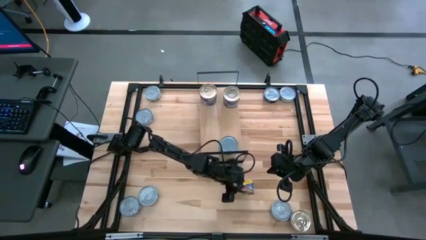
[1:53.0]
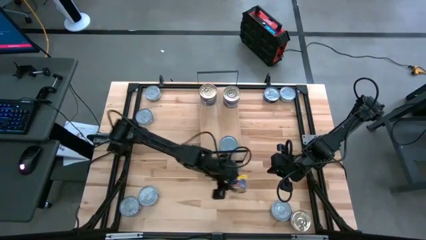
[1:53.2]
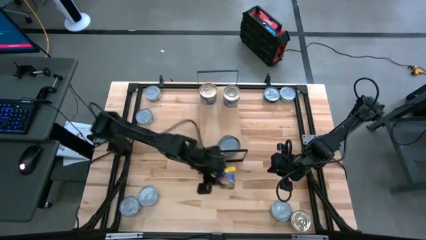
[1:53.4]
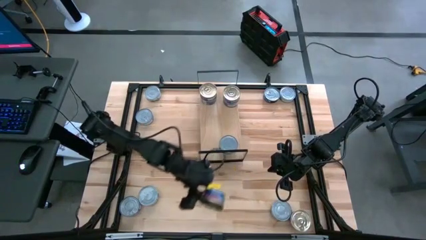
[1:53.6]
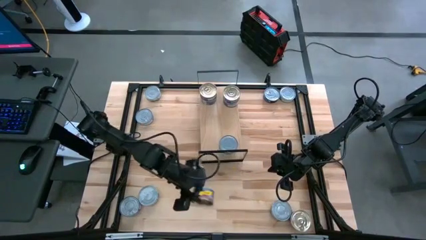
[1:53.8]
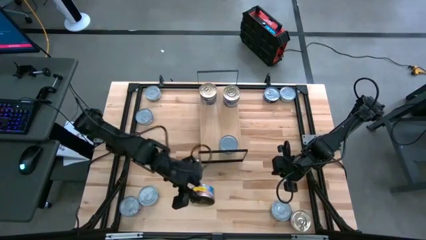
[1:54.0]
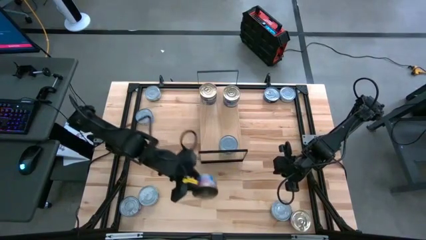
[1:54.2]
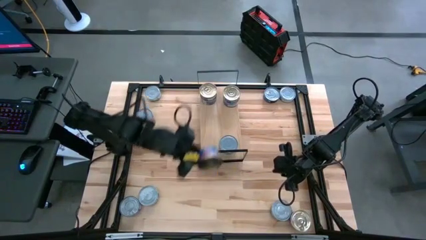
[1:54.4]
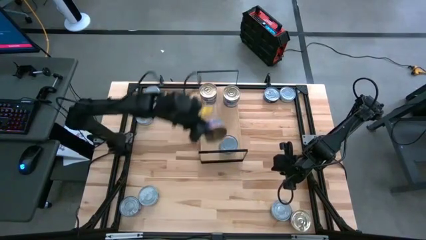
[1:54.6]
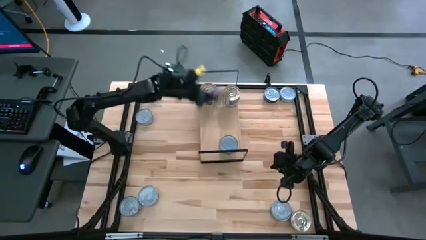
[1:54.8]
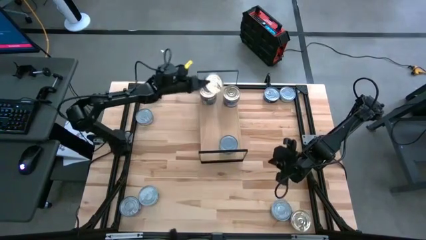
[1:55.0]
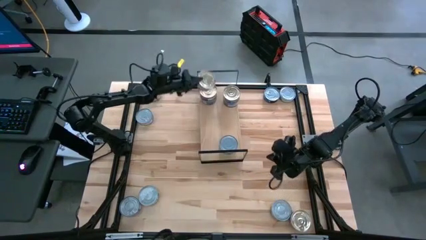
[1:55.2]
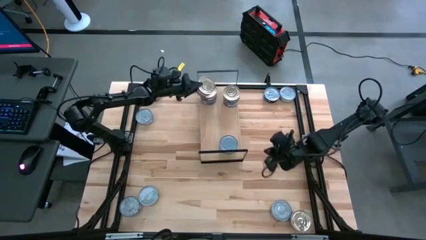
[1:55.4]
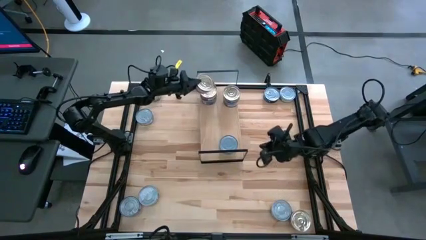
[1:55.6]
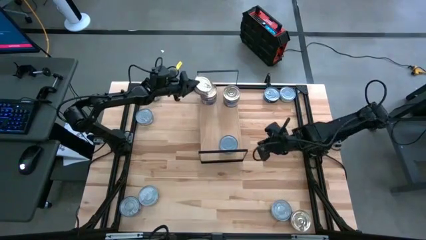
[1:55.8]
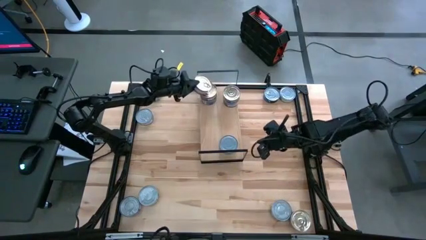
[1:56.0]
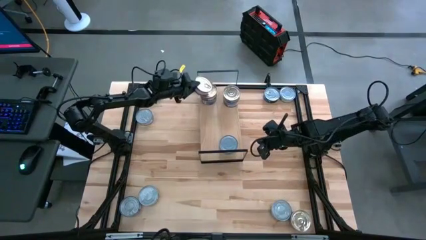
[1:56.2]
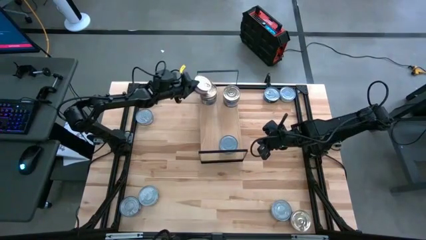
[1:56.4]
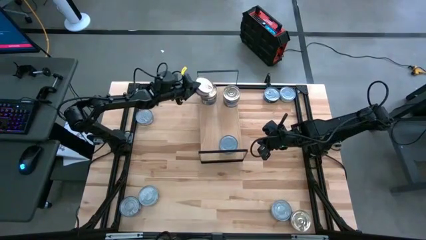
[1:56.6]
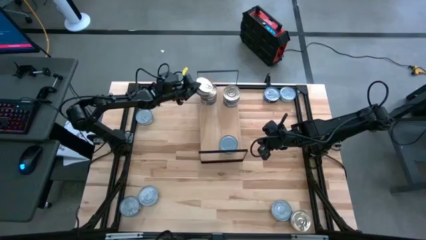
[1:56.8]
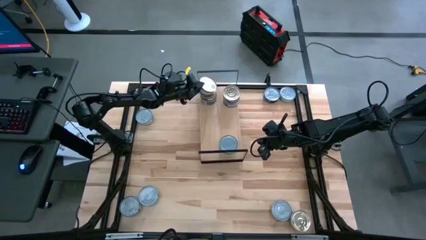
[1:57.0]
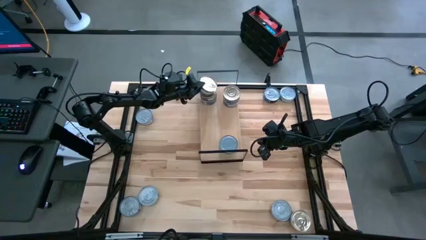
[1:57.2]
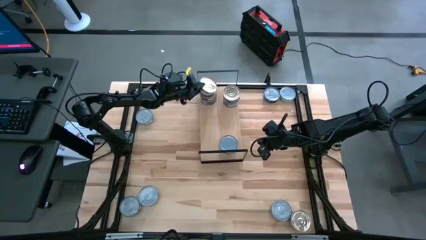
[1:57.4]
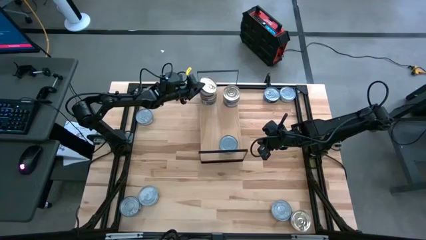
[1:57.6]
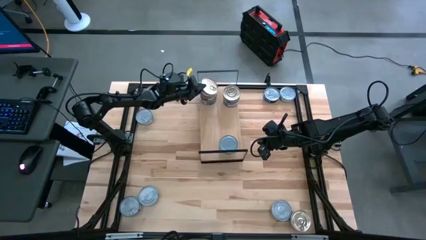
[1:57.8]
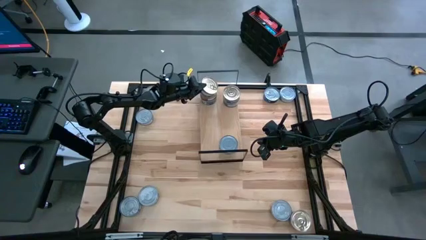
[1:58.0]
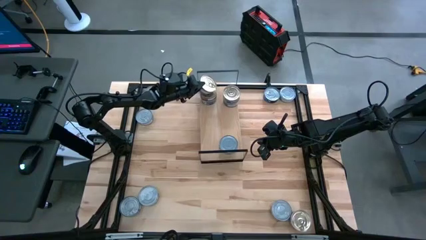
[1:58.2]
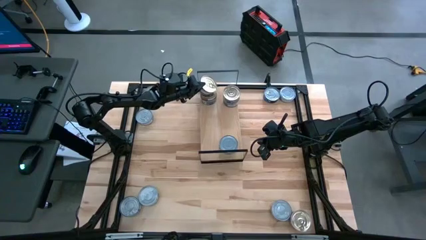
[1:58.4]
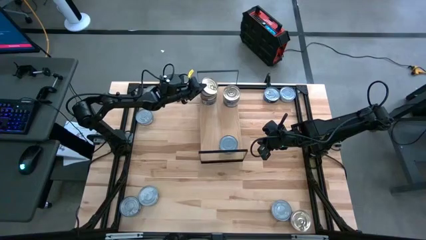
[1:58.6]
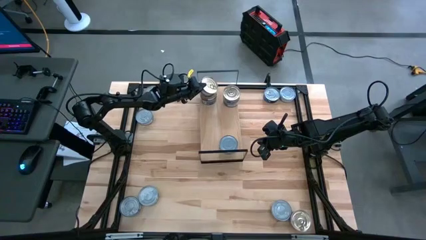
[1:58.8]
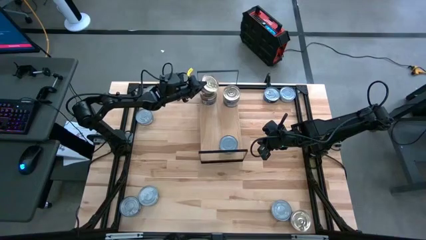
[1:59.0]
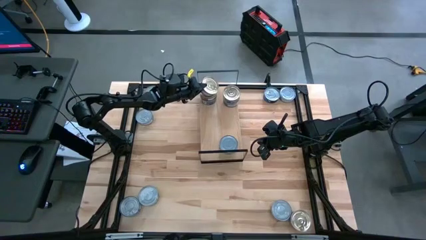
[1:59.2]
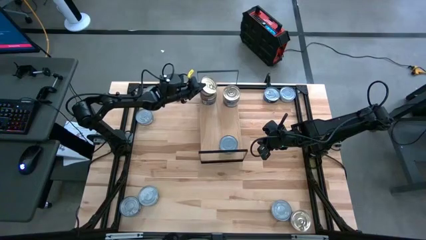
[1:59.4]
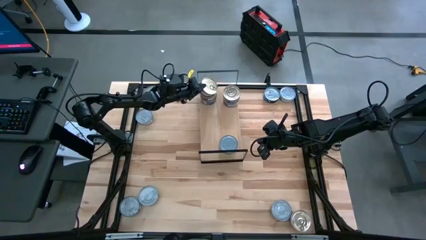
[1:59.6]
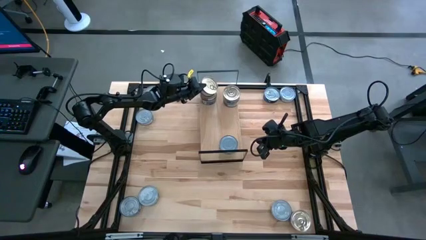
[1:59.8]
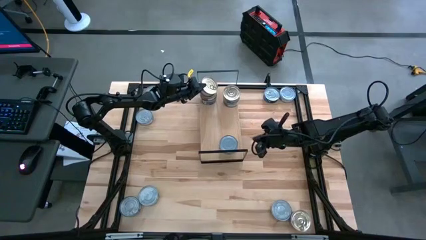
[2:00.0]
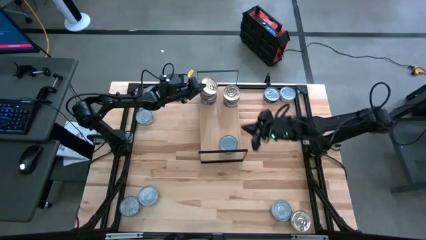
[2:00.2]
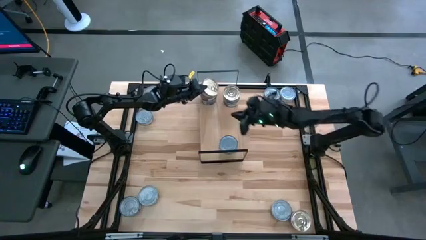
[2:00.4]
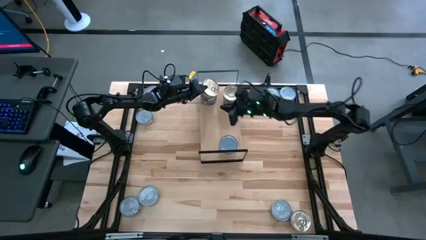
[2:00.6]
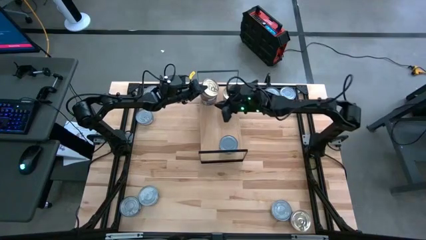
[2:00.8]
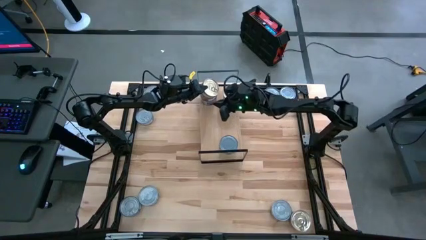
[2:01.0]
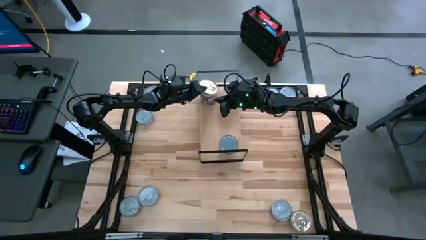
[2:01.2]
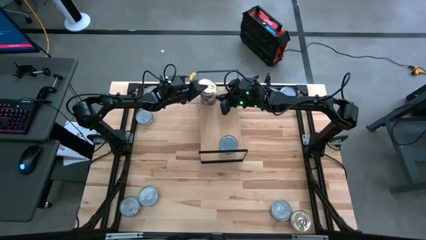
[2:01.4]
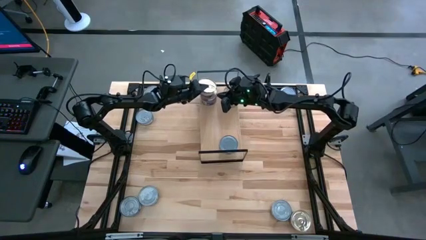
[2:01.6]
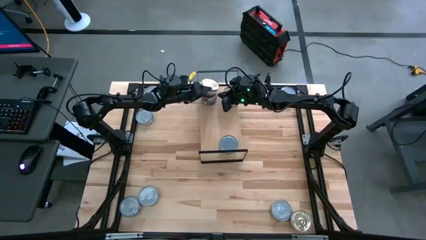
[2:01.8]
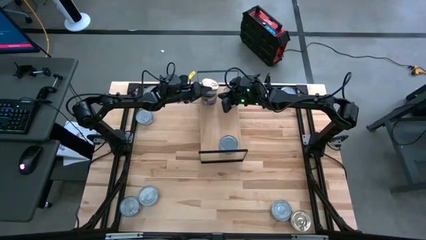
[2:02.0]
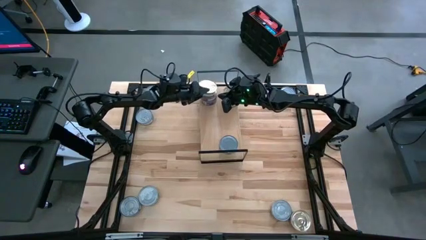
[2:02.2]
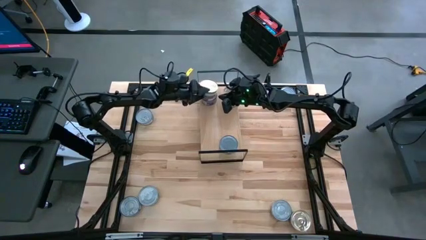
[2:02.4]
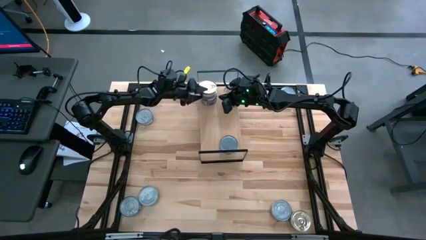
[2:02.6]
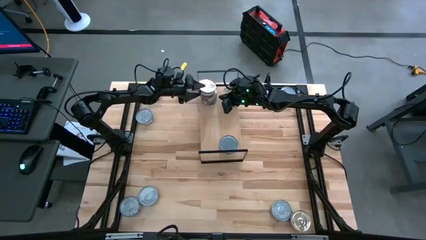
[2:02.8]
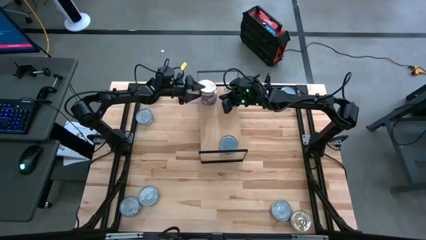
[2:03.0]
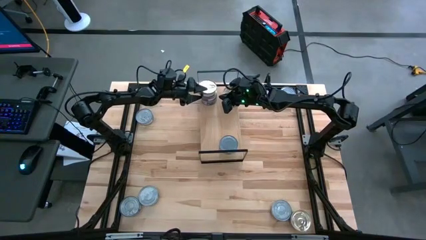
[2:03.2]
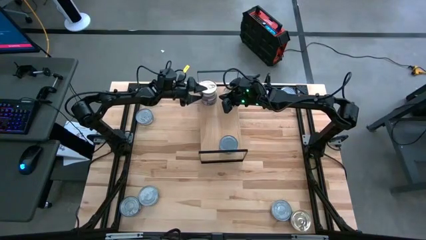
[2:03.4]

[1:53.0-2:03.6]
Task: Stack canned seafood by type on shelf
Stack the blue pink tuna can on top of the other blue pink tuna cans on the shelf
